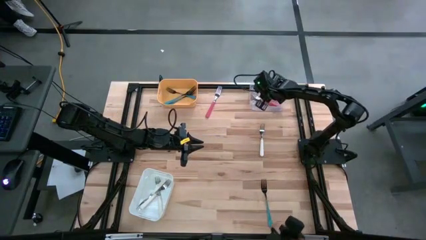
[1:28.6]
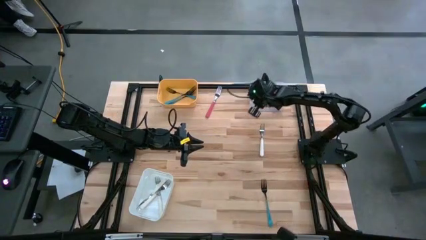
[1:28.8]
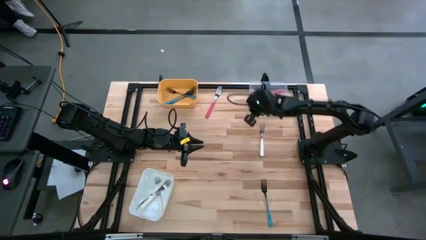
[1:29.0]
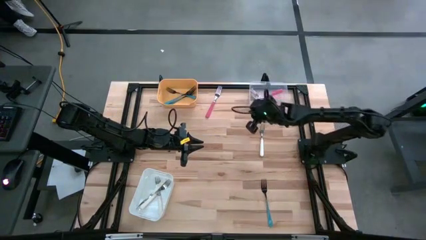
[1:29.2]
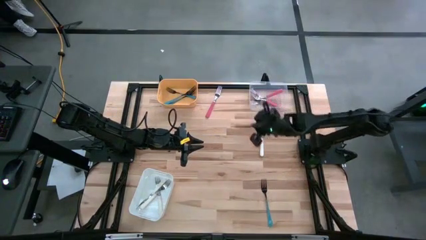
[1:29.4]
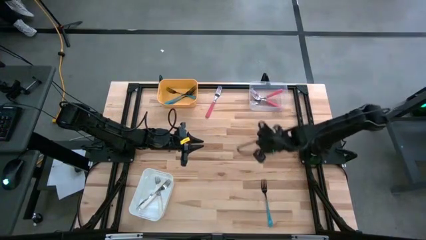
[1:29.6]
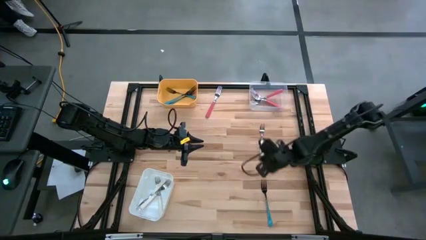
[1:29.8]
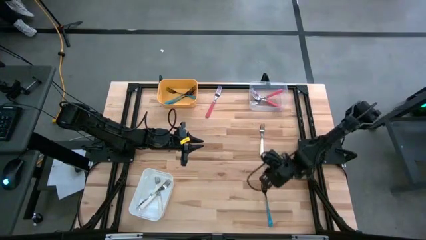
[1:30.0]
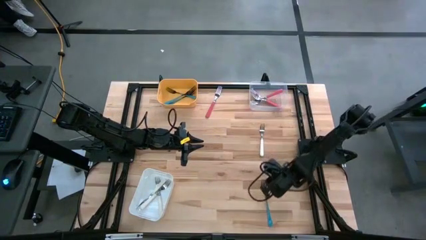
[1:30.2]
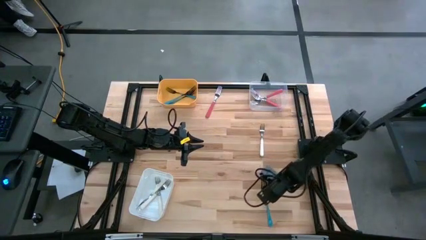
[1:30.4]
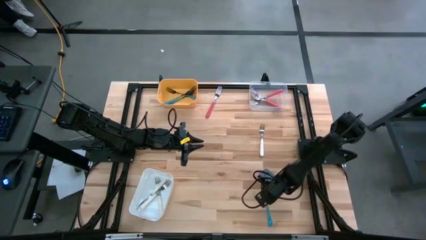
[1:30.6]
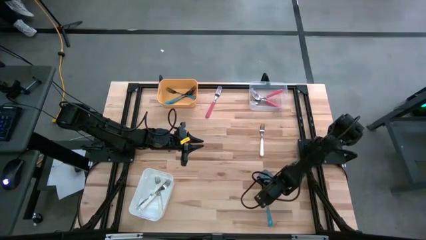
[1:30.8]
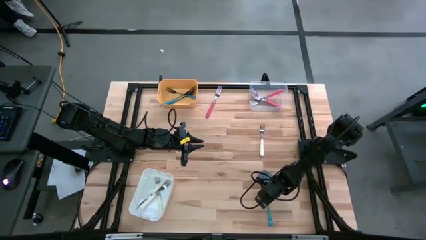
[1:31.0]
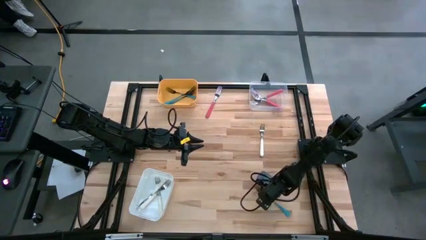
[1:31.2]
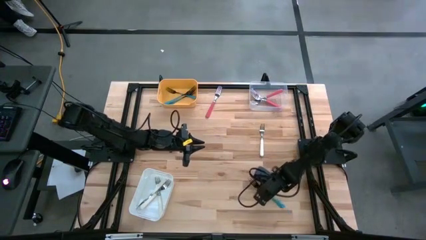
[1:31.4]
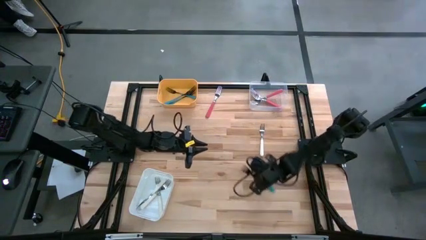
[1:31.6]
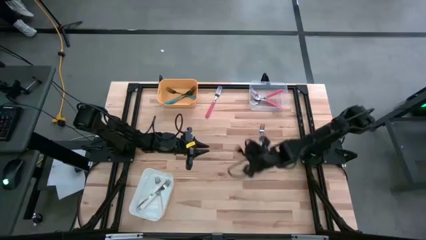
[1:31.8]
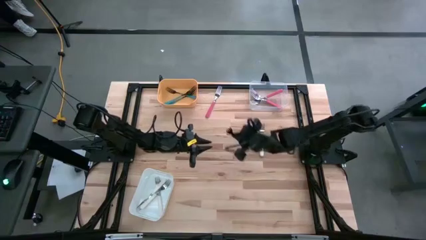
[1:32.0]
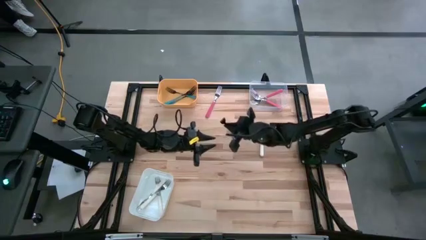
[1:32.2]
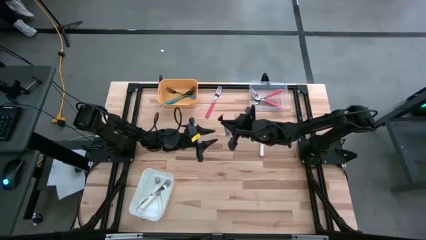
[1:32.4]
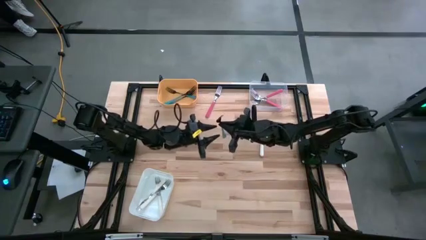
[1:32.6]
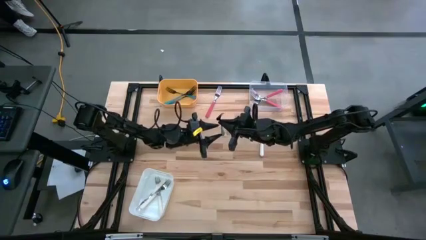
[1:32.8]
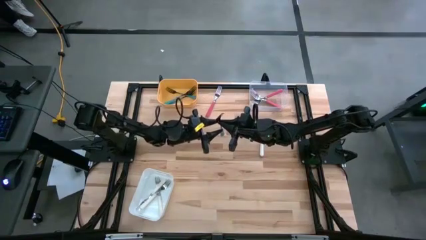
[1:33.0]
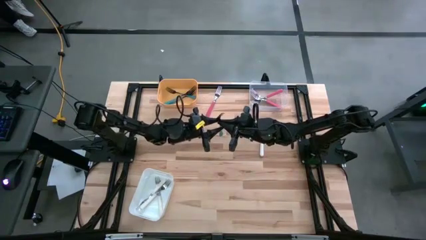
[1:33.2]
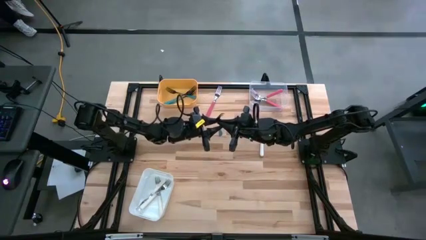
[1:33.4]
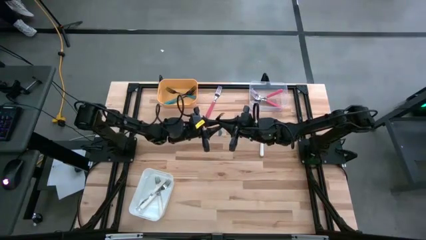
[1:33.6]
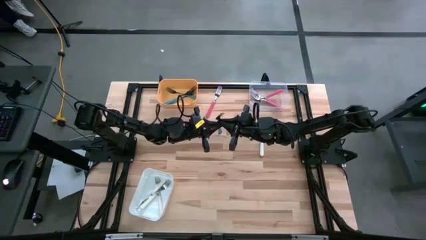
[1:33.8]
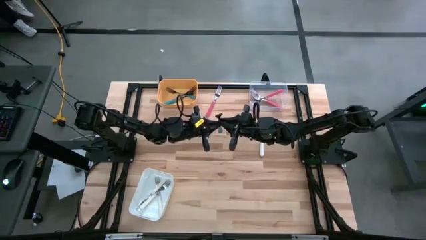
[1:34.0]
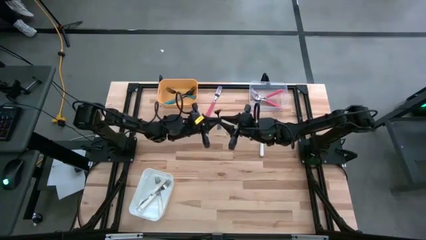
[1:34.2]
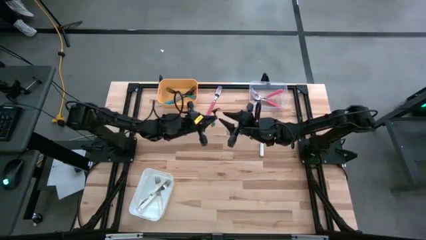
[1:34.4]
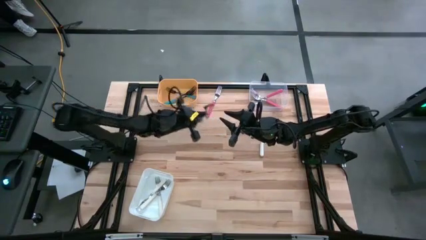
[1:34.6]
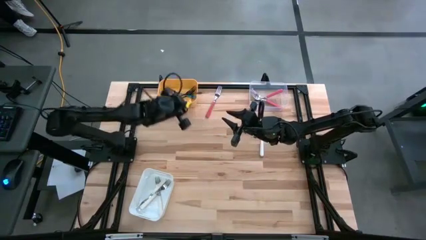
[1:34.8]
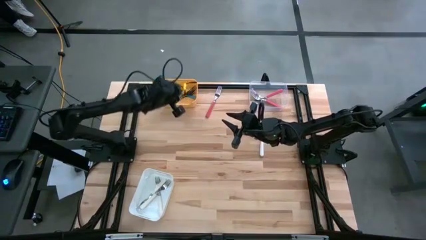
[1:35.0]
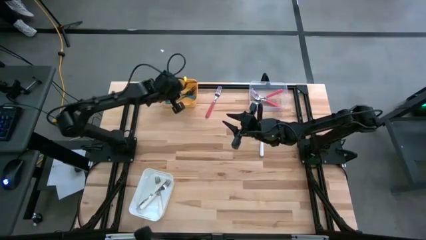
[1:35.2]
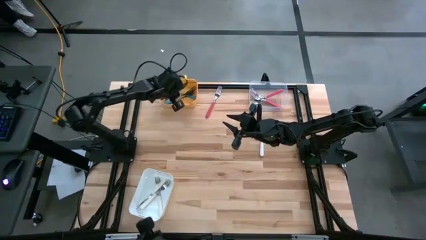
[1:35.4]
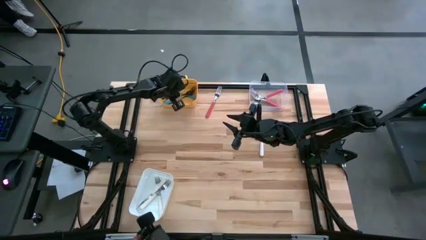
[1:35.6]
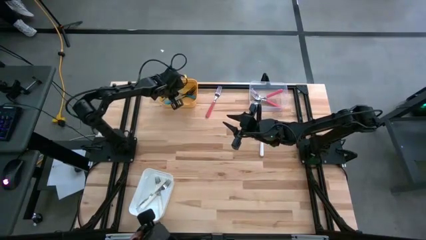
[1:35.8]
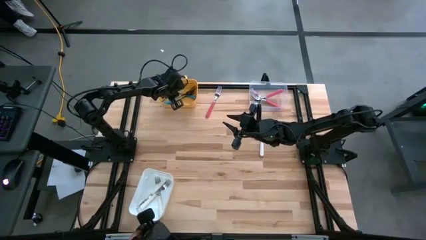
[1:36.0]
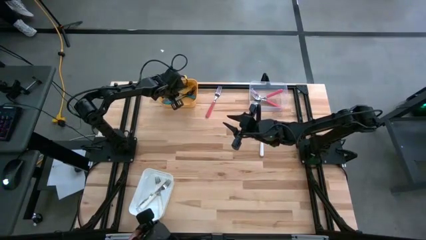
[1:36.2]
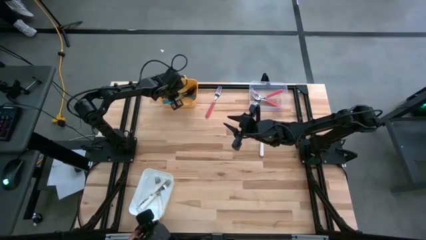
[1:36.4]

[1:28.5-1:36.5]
Task: Sort silverware by color (type)
Put the blue fork into the yellow bin

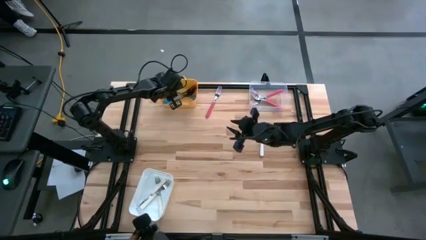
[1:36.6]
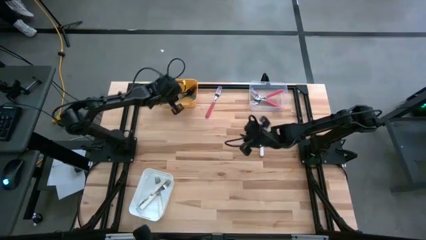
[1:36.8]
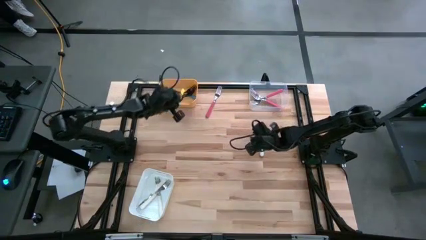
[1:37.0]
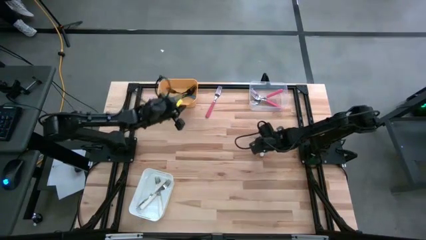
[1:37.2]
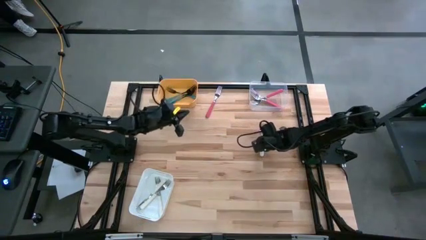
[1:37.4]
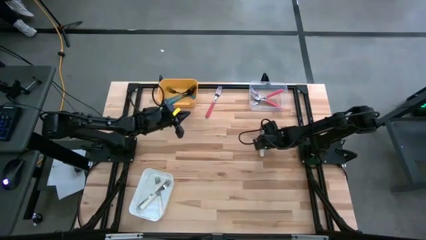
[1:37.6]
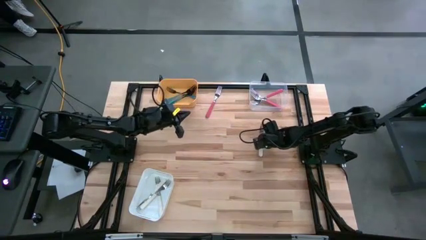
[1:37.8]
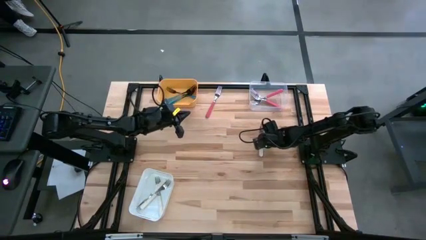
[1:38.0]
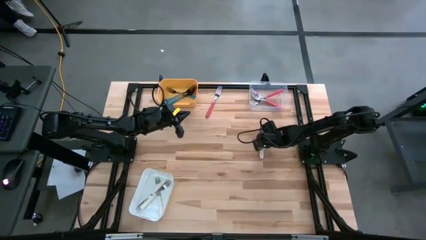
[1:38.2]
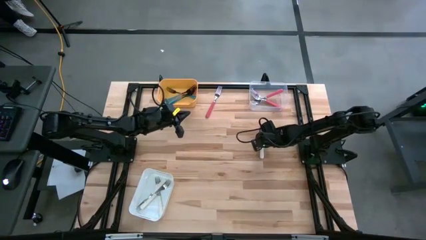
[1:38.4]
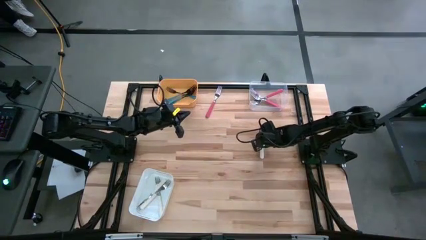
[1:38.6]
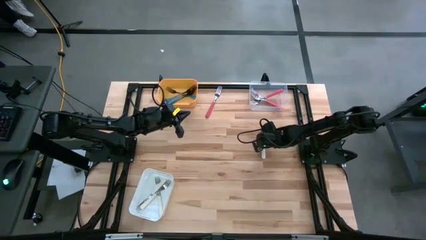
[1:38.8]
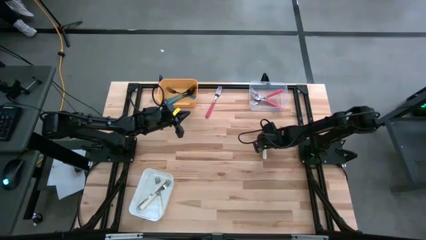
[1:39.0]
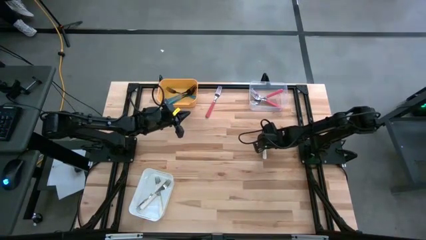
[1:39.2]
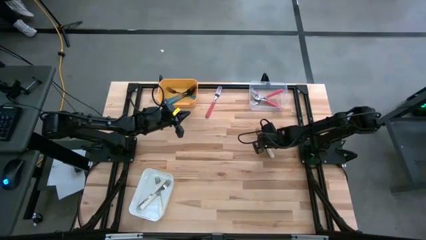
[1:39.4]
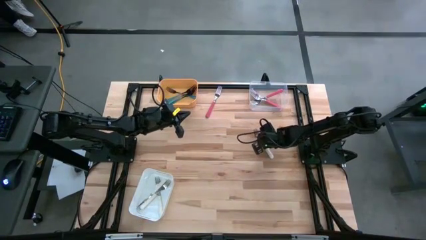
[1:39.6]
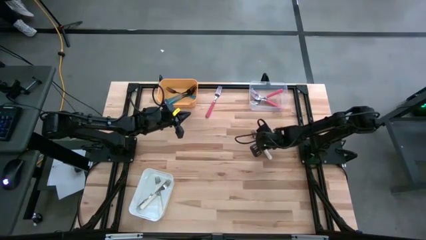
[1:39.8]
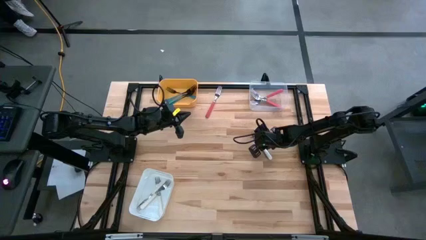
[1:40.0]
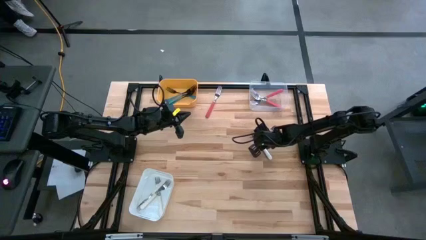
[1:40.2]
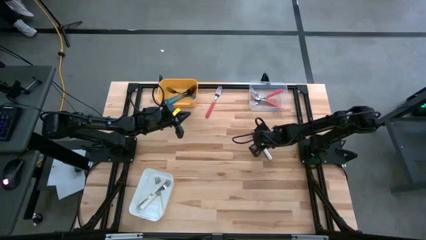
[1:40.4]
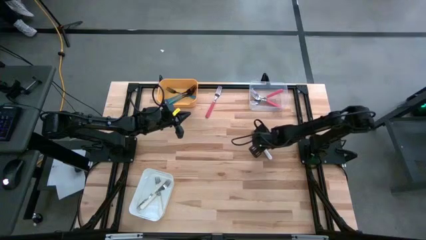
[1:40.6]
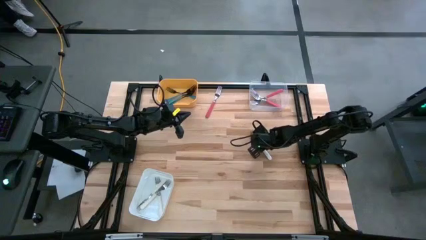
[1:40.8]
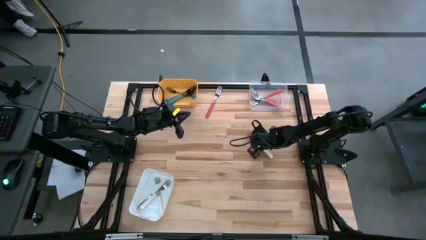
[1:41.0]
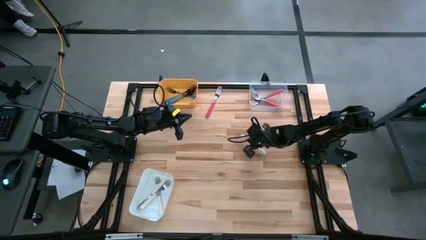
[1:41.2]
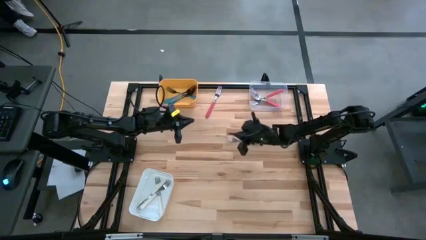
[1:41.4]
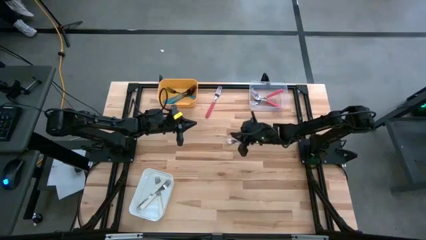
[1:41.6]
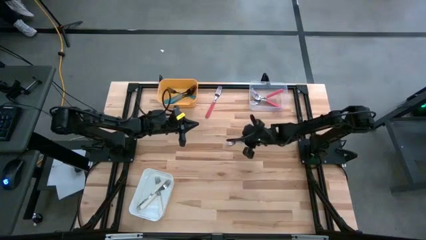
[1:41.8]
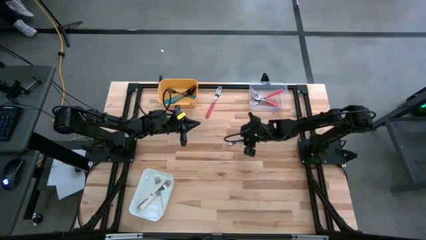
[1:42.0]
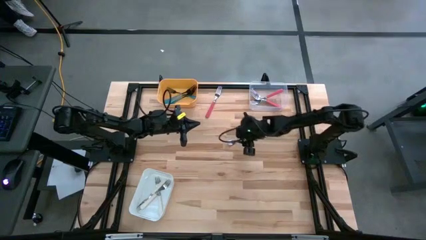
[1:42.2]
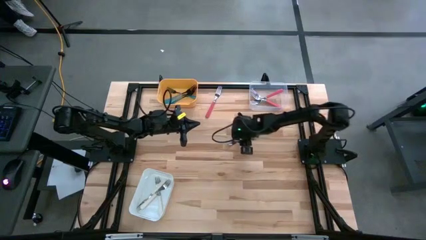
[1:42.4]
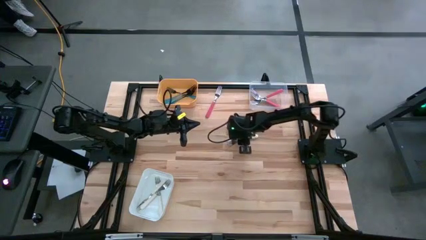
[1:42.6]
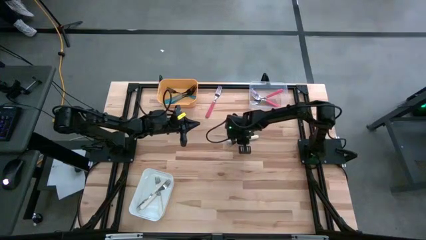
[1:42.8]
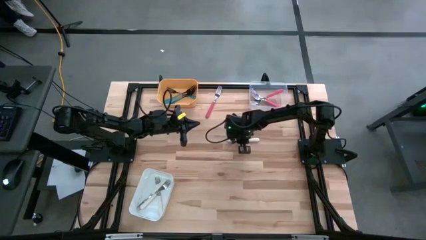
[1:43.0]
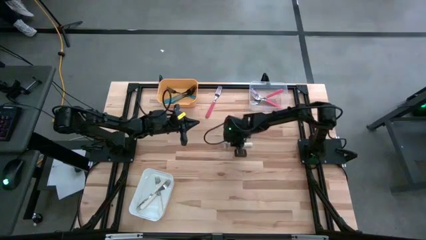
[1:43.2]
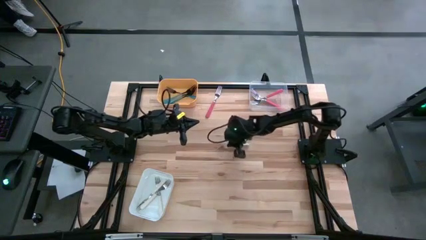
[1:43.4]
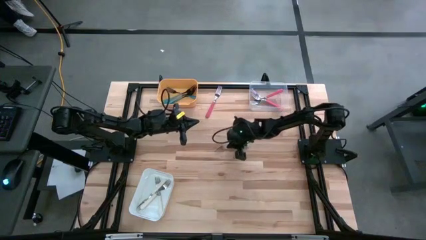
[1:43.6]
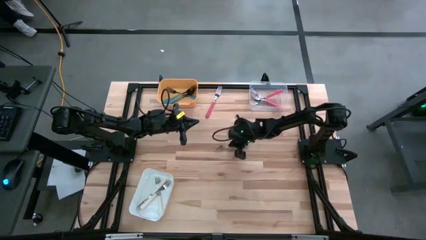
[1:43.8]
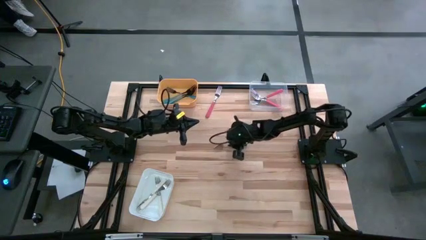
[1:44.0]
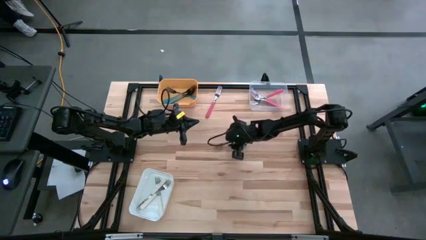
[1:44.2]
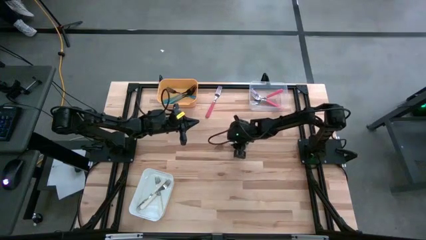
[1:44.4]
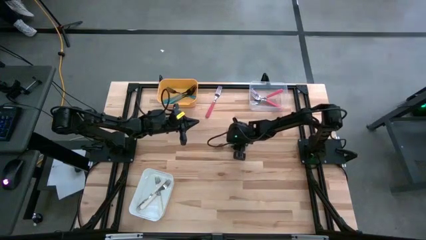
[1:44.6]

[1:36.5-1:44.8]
Put the white fork into the white bin
